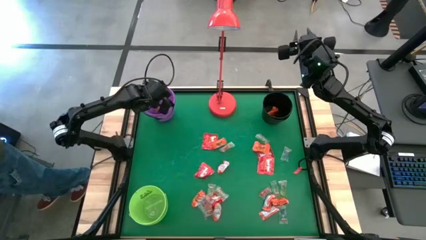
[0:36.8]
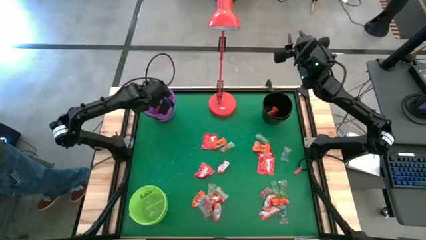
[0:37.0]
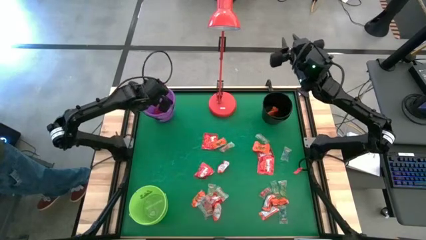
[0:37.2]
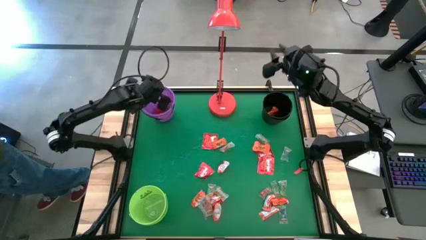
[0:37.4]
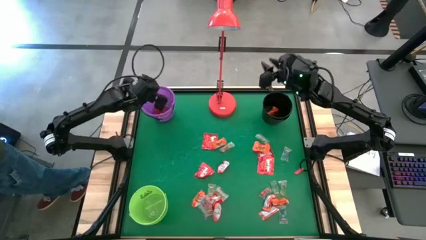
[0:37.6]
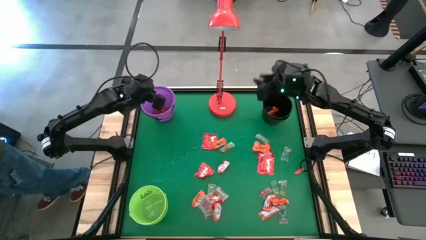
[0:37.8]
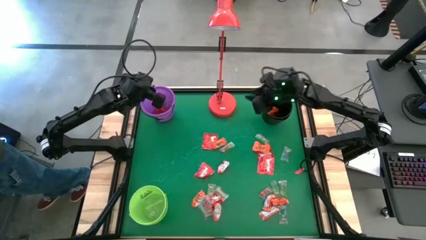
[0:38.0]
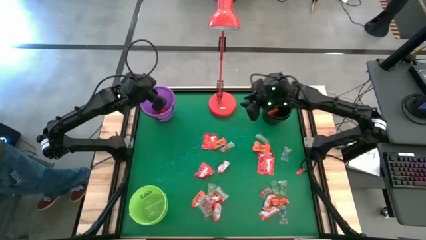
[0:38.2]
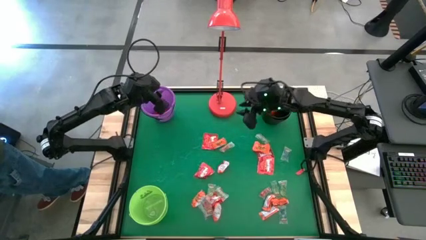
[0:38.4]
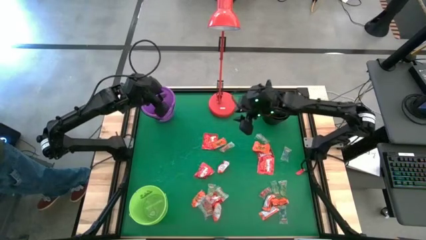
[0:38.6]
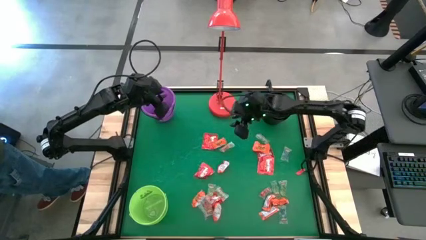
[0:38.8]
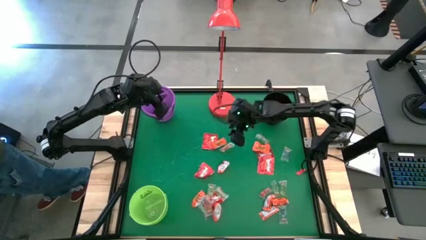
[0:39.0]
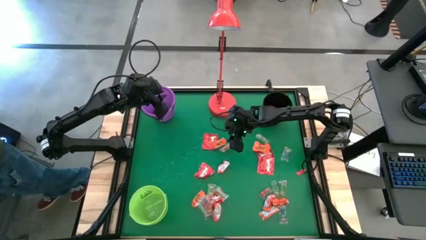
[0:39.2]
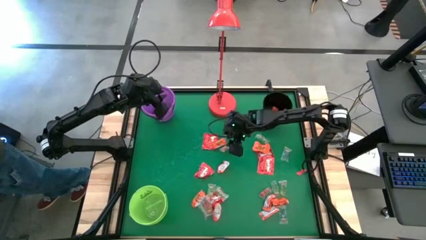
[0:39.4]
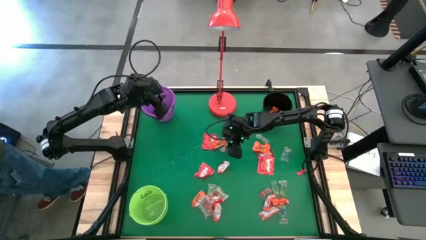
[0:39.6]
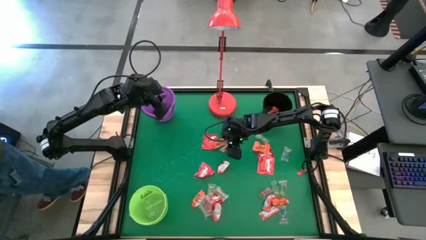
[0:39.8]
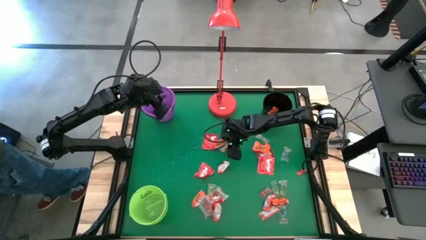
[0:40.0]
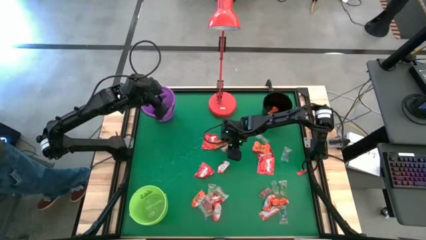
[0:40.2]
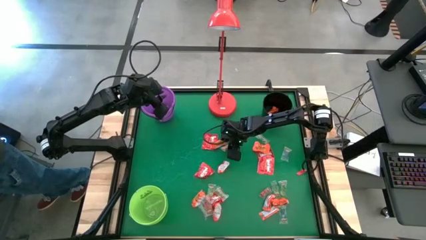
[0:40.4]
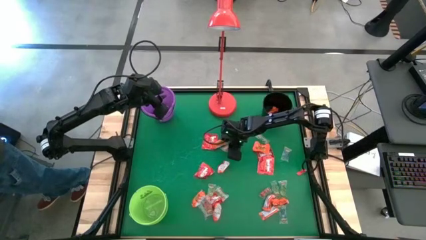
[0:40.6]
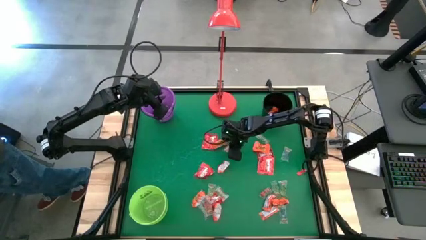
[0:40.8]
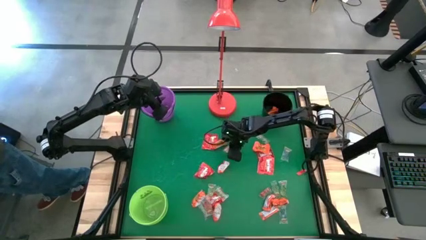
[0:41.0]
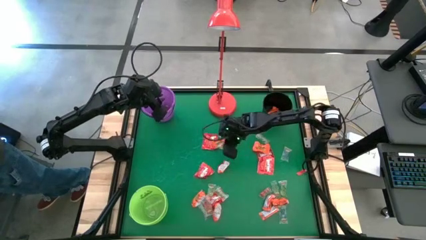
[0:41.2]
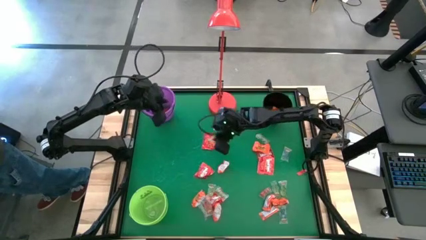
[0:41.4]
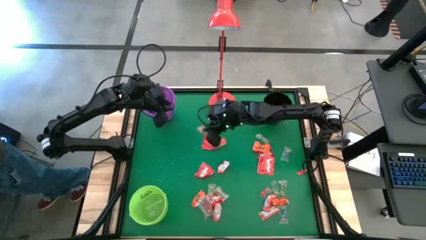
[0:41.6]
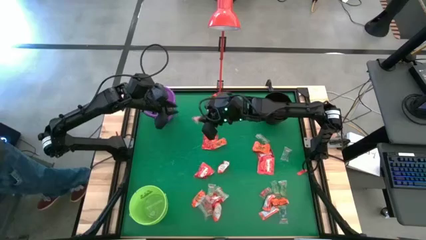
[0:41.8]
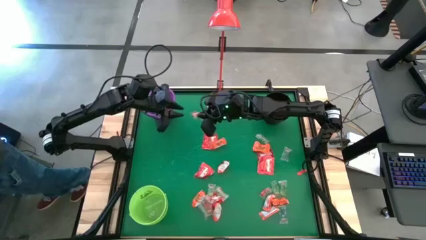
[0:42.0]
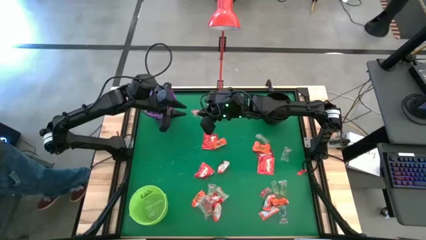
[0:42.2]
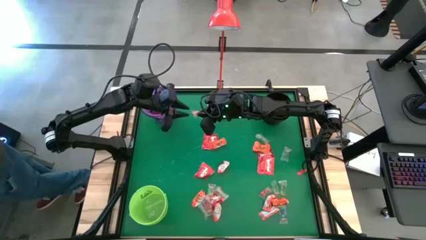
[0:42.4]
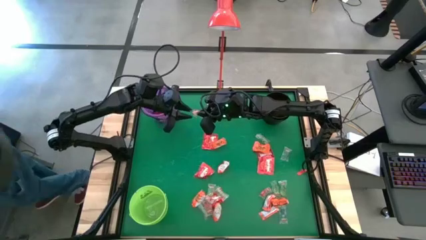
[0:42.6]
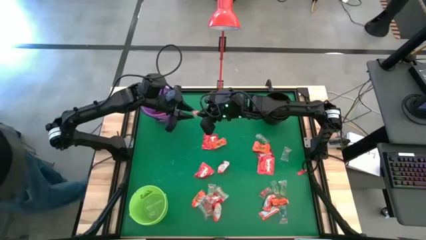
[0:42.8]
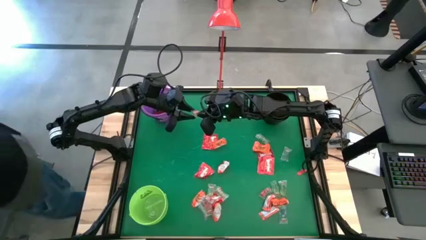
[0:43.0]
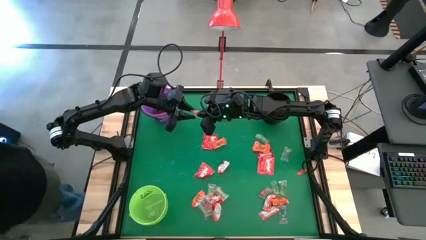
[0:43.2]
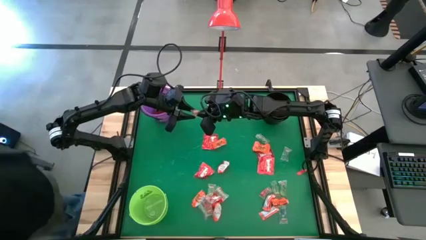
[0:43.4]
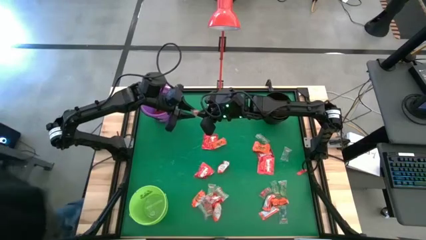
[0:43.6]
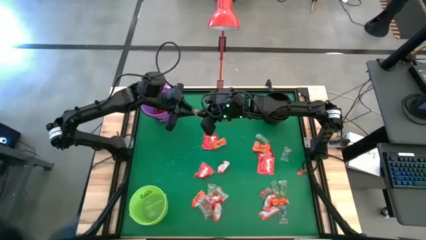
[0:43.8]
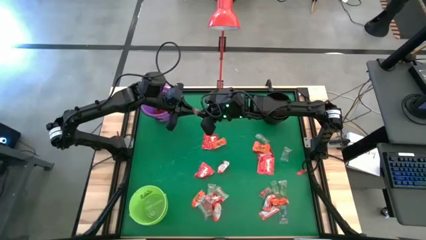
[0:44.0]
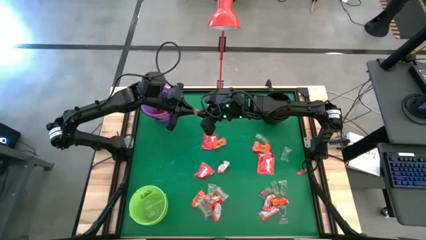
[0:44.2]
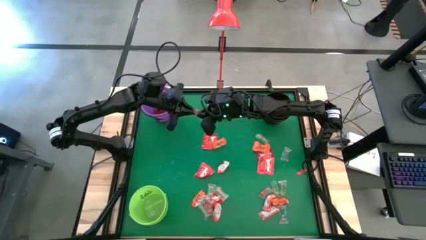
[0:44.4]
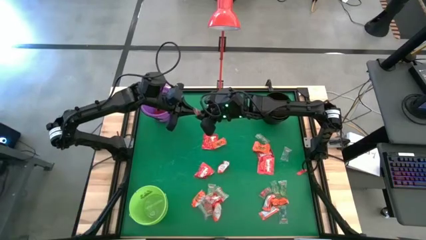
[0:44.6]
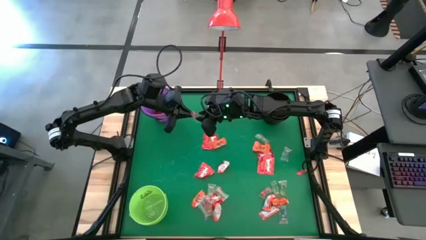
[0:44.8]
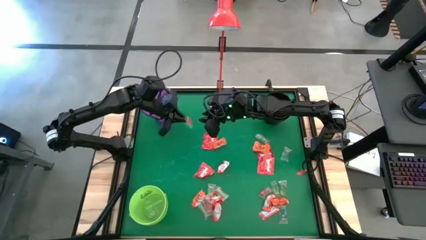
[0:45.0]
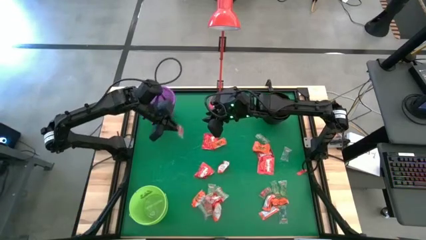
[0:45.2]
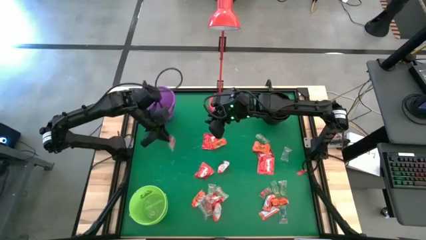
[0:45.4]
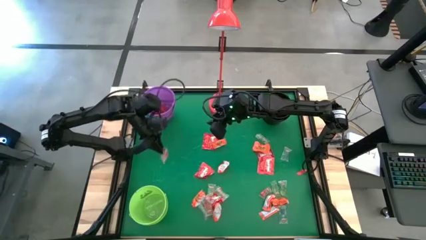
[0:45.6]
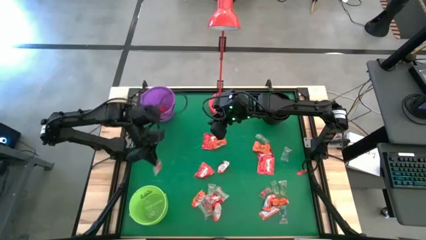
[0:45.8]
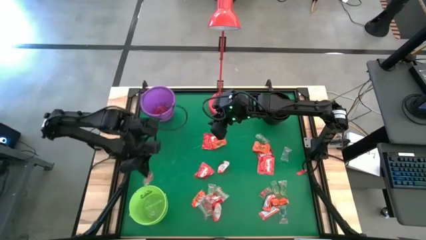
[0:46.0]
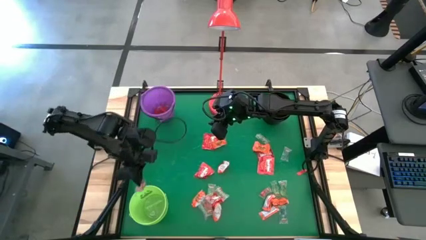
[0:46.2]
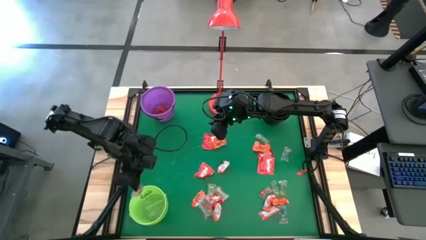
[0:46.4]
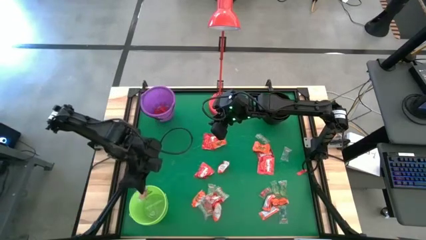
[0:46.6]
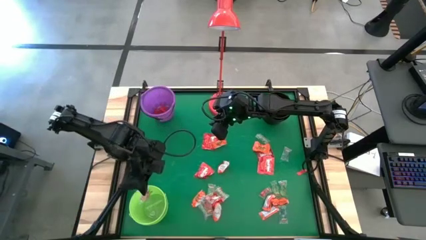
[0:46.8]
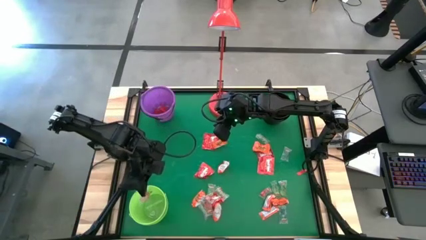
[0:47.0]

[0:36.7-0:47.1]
Task: Sort candy
Put the orange gummy into the light green bucket

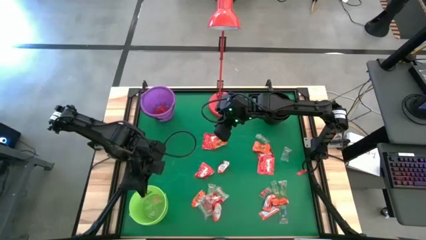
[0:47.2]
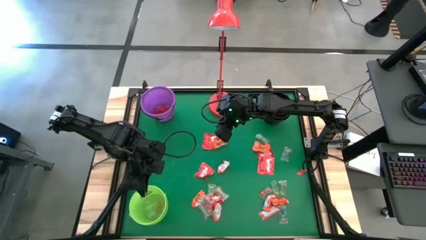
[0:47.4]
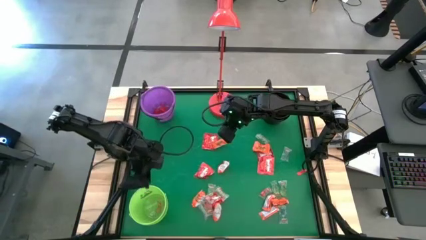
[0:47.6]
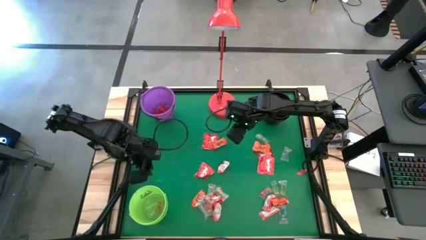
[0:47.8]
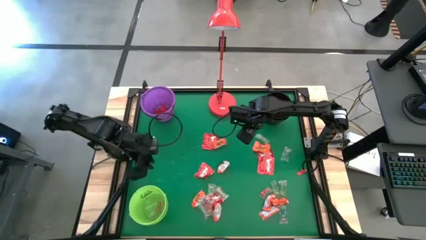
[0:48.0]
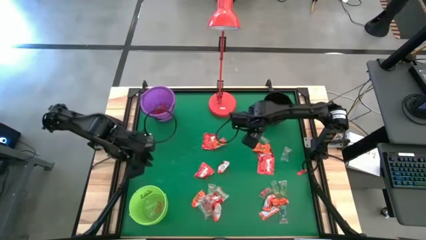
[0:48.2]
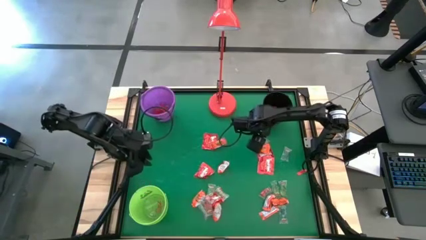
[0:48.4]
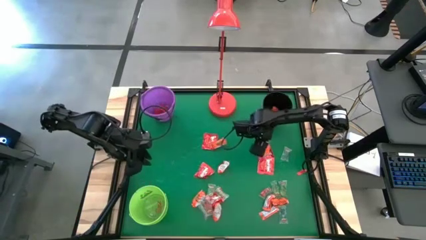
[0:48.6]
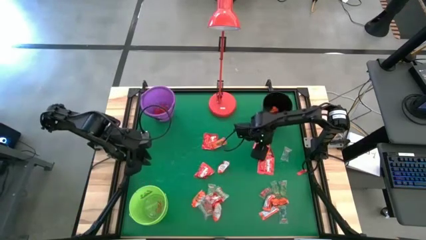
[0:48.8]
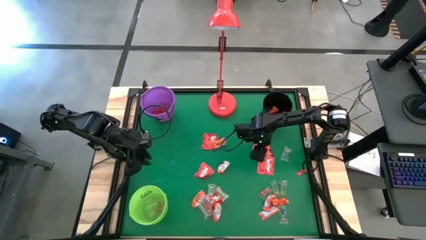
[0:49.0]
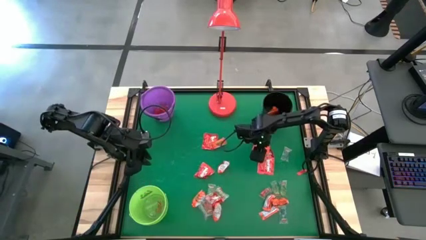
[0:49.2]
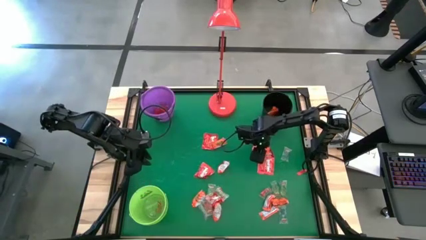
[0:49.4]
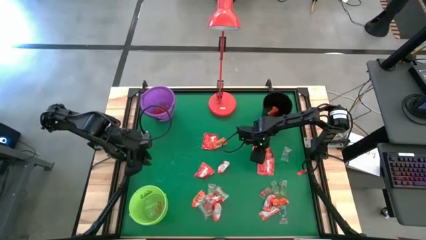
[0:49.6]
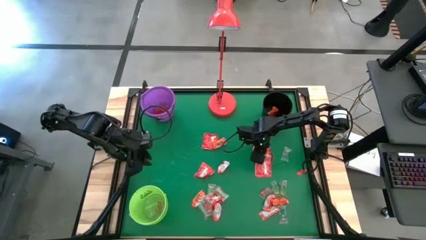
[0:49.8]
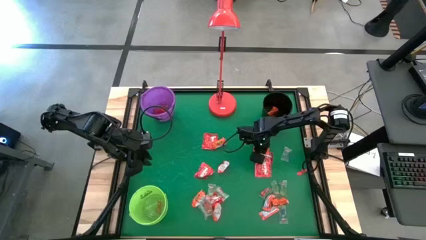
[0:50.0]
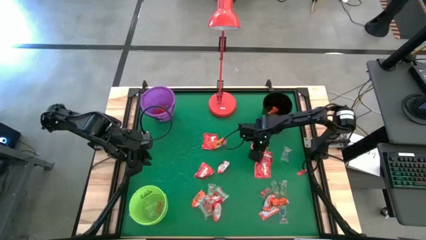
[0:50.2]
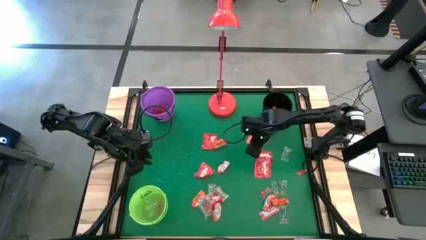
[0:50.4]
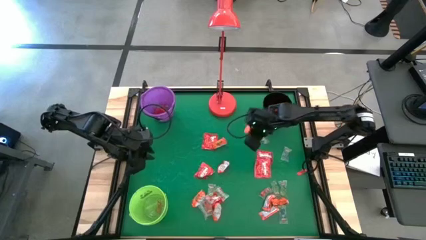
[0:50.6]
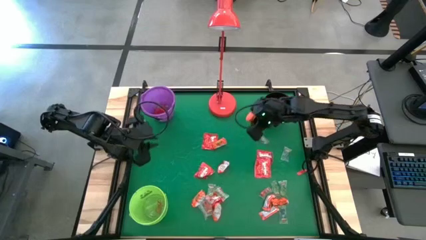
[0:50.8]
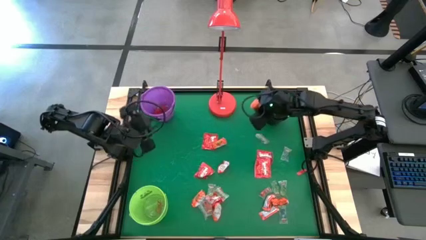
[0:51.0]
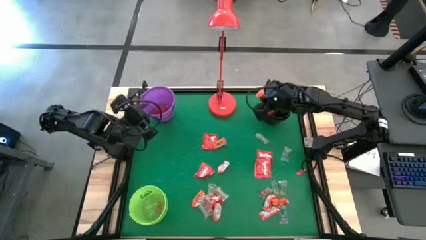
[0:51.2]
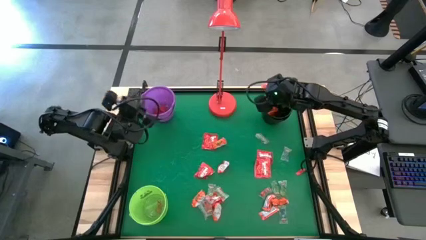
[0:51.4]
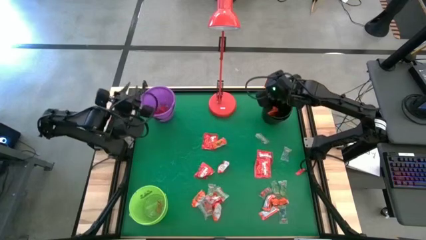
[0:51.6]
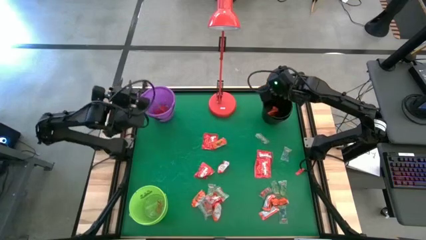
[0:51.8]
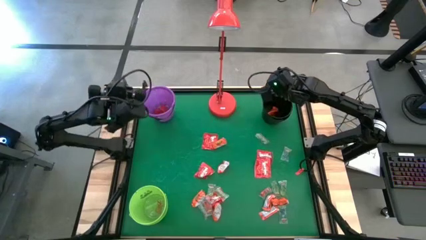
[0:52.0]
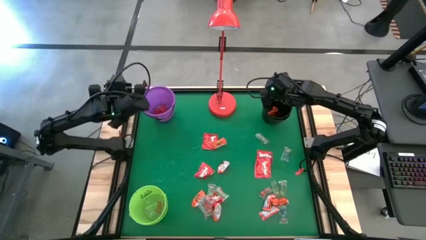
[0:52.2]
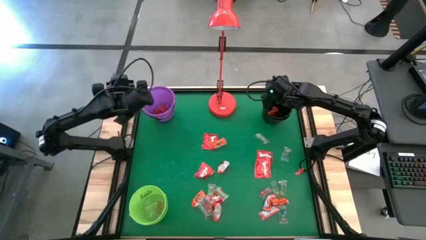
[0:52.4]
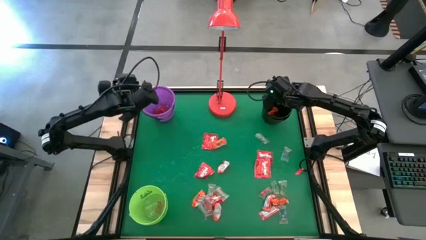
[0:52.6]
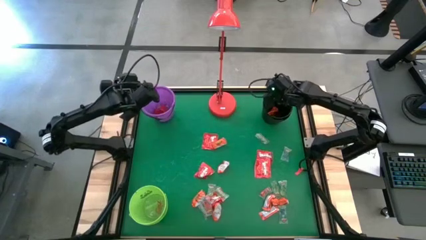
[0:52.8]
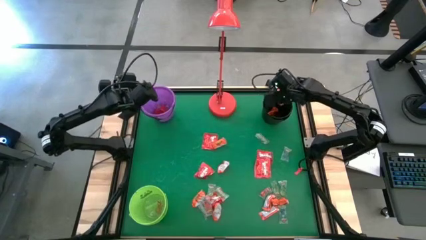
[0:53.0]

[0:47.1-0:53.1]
Put the orange chocolate into the black bucket
